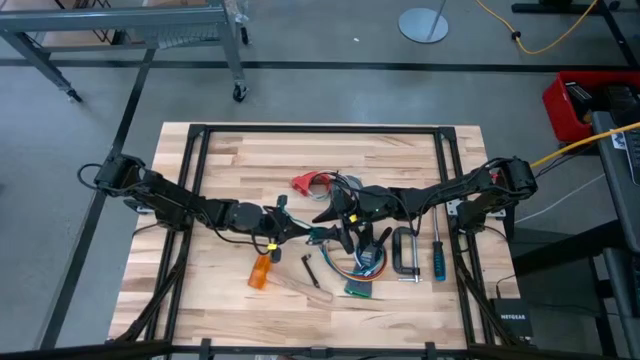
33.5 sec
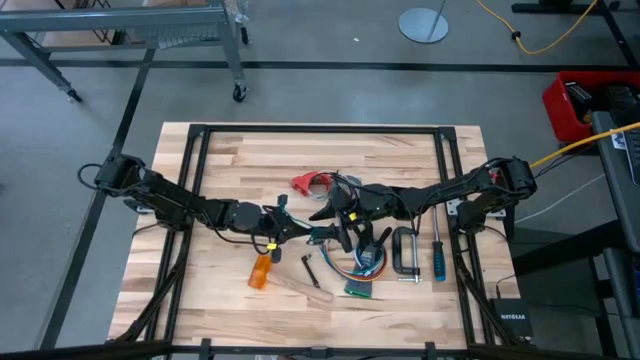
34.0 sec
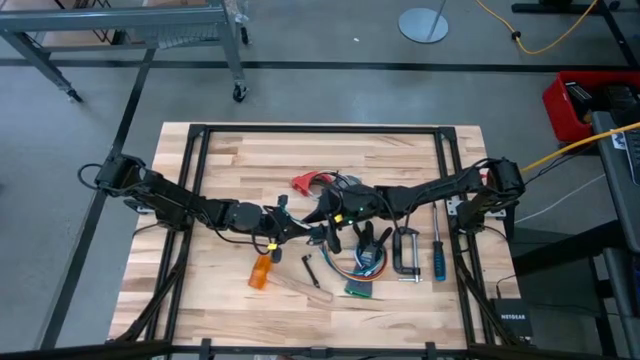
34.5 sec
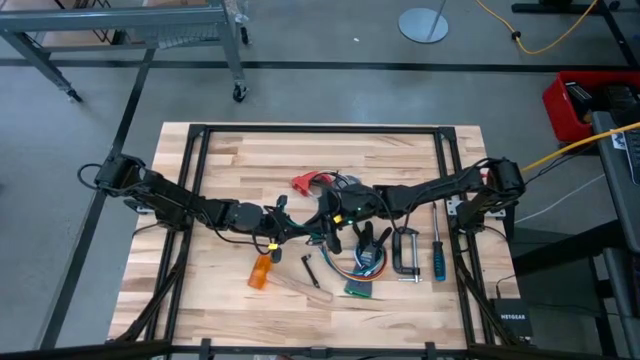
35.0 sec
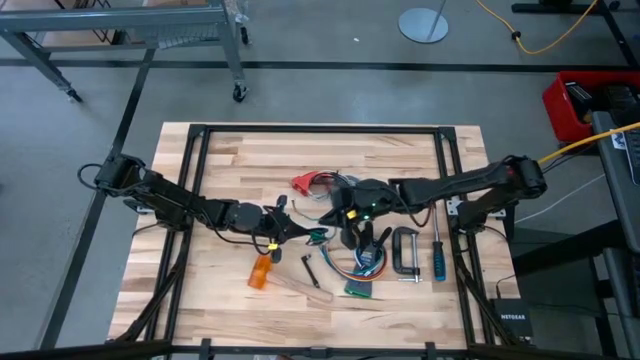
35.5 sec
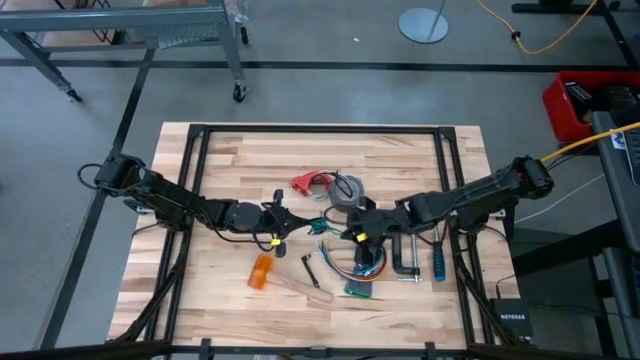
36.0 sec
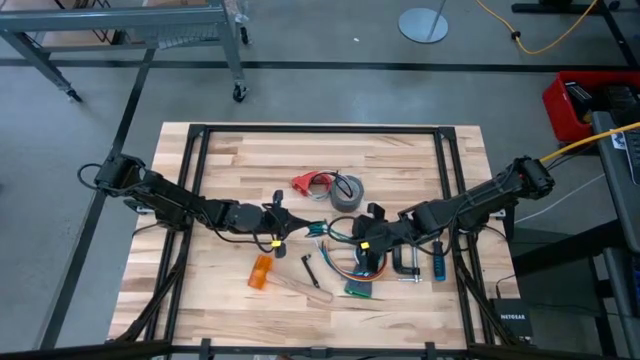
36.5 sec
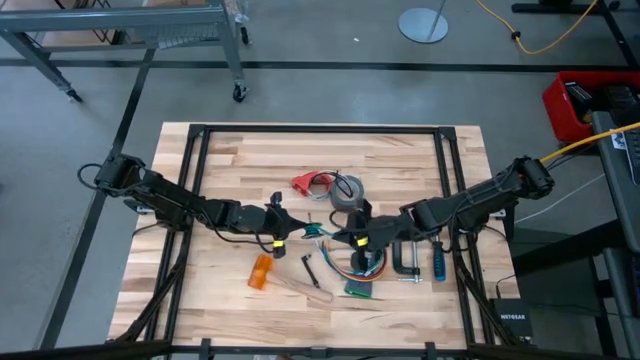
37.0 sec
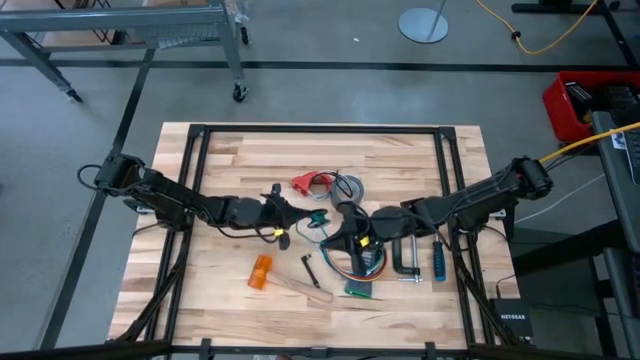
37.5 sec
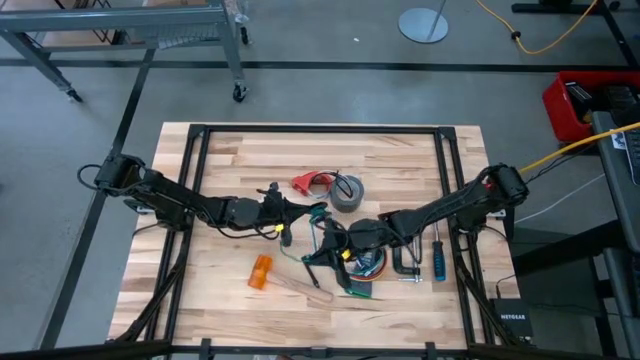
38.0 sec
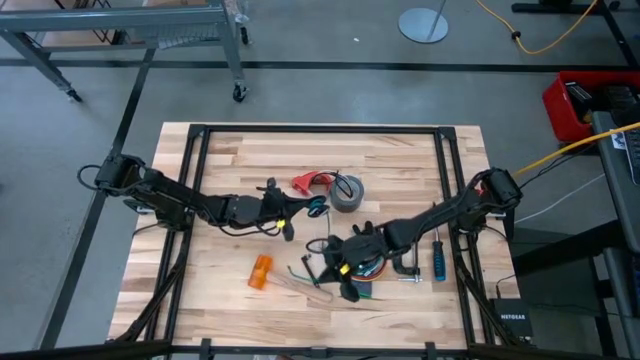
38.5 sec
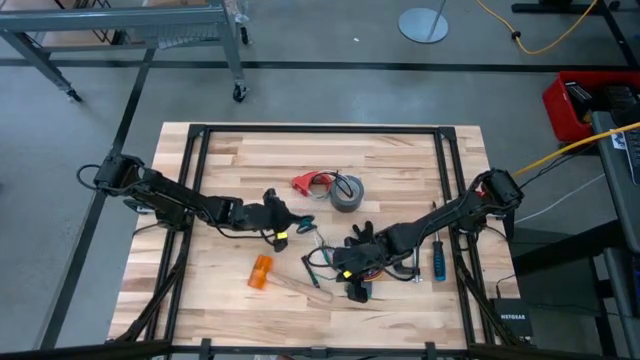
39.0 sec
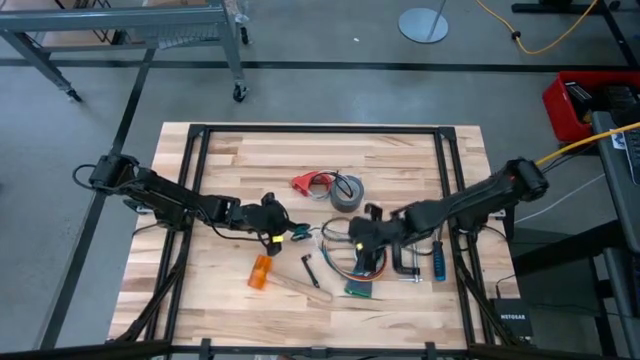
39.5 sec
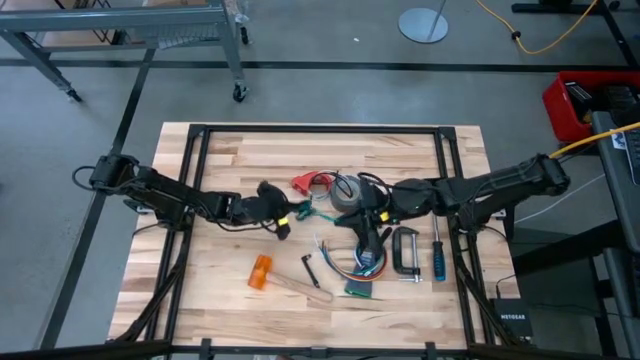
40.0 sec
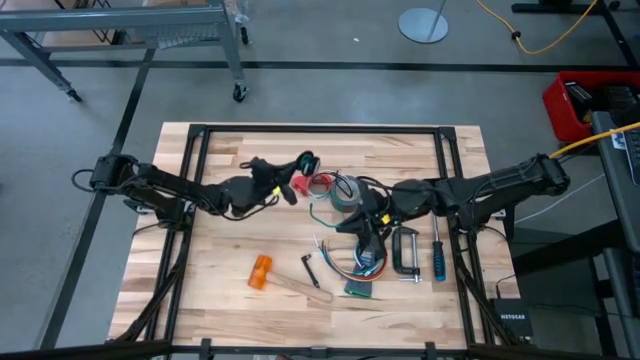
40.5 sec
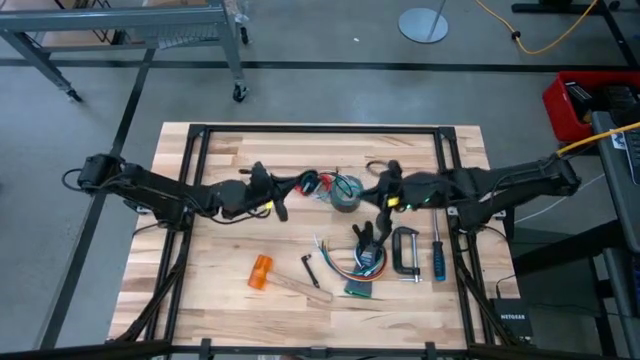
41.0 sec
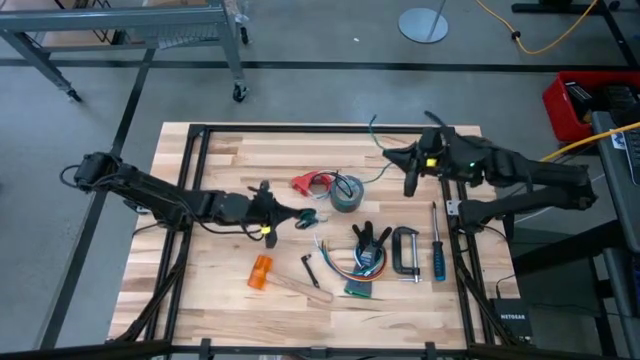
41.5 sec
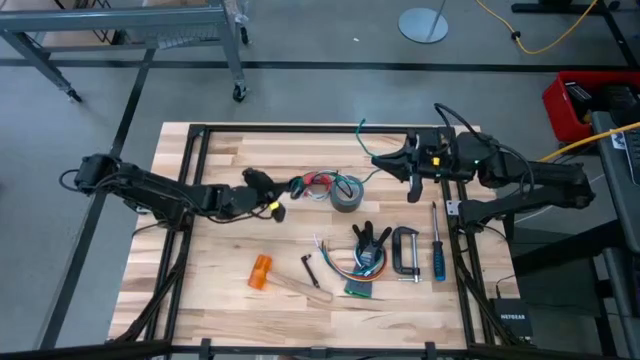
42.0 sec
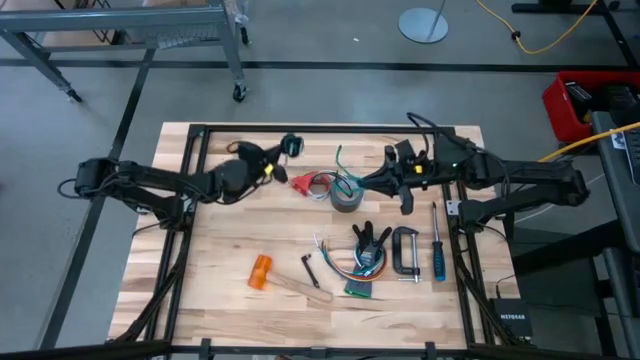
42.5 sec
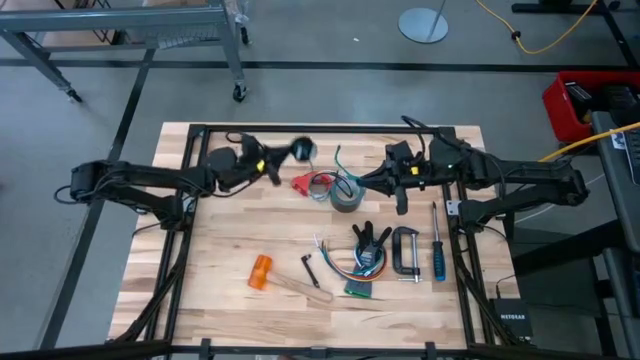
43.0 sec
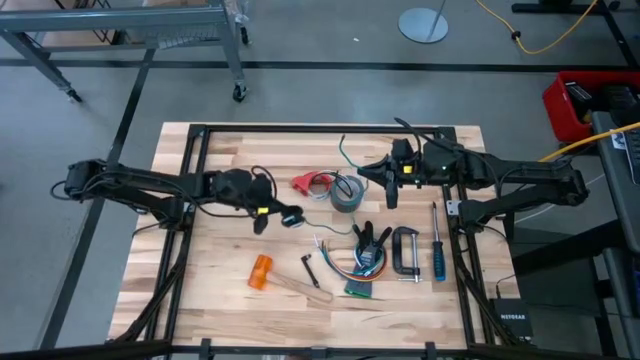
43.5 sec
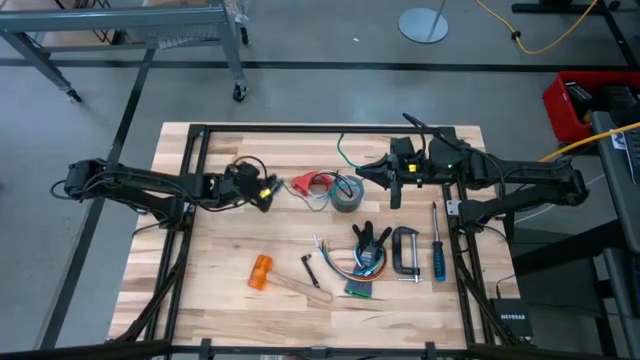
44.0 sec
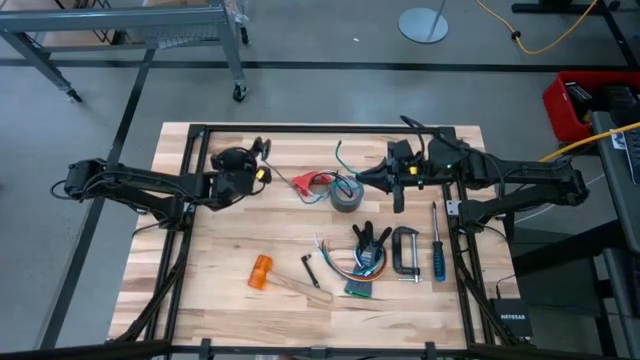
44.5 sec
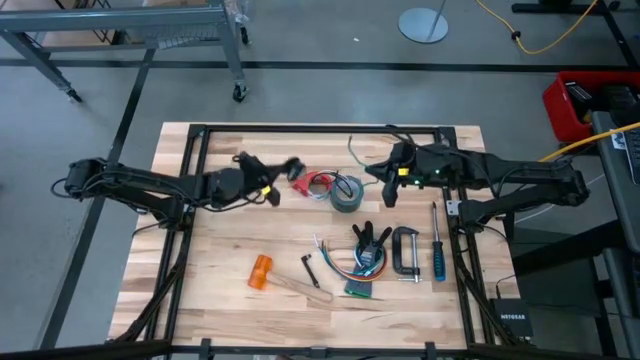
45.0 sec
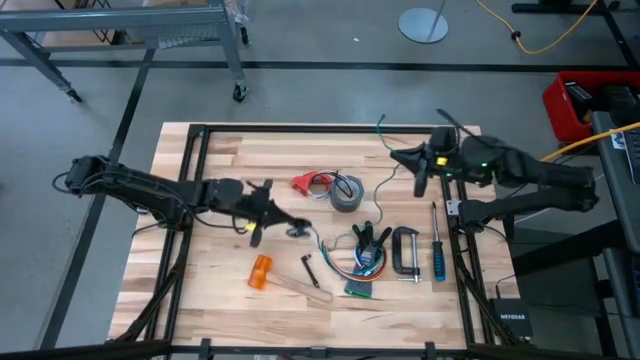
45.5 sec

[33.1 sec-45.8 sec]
Task: Coil cords
Uncoil the blue wire from the spool

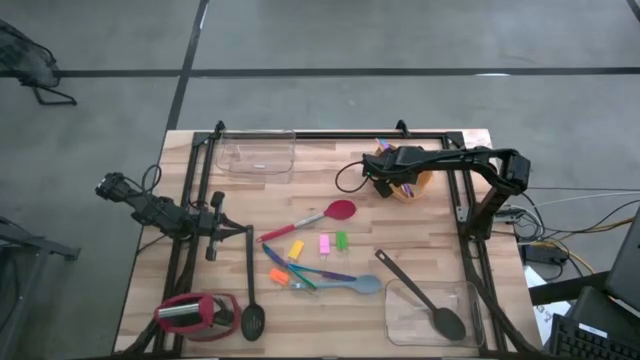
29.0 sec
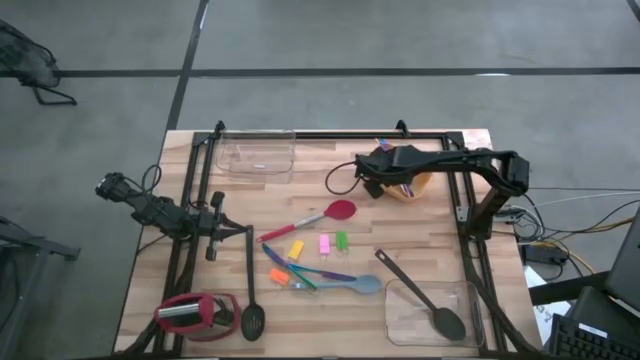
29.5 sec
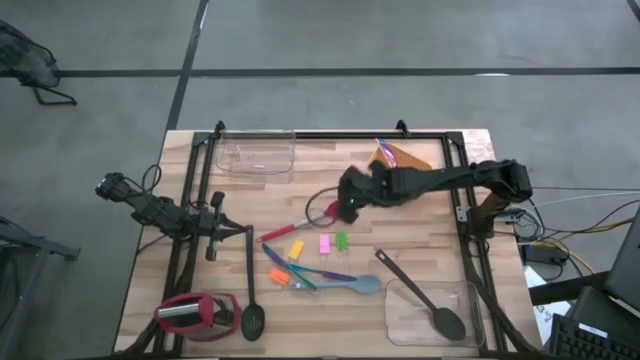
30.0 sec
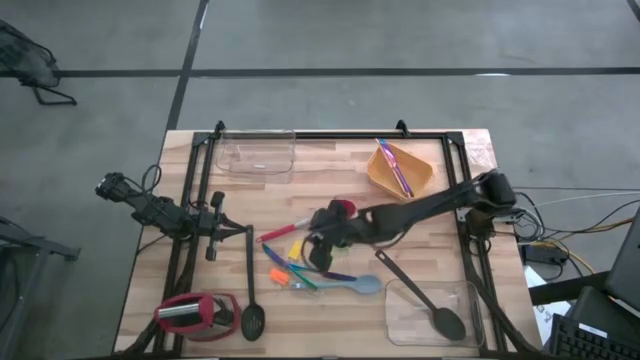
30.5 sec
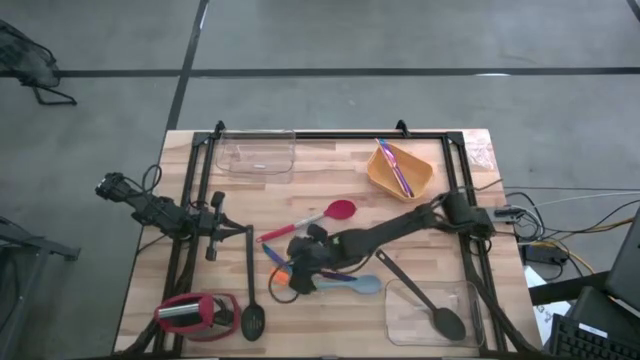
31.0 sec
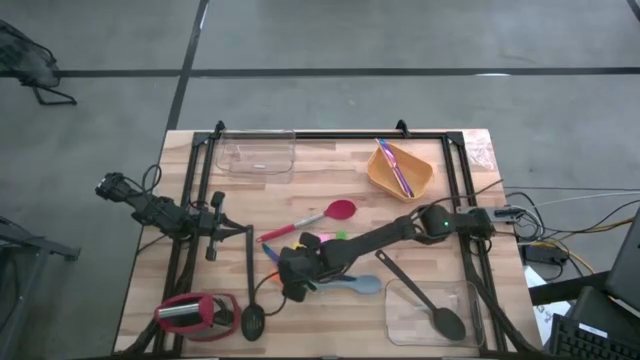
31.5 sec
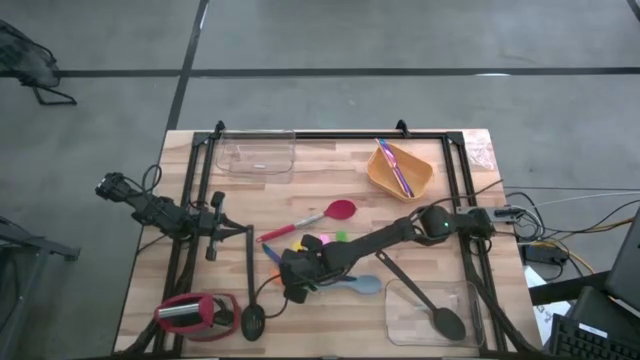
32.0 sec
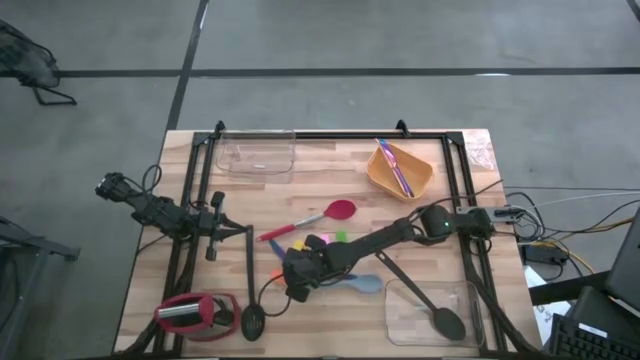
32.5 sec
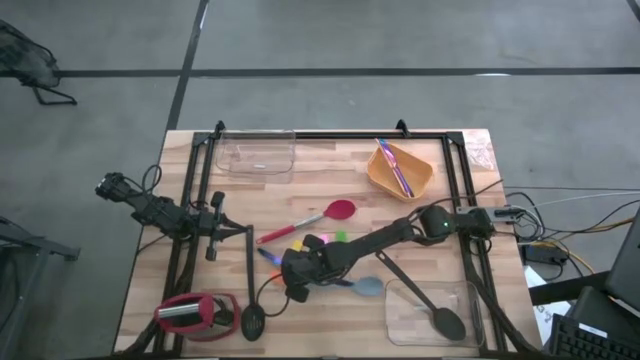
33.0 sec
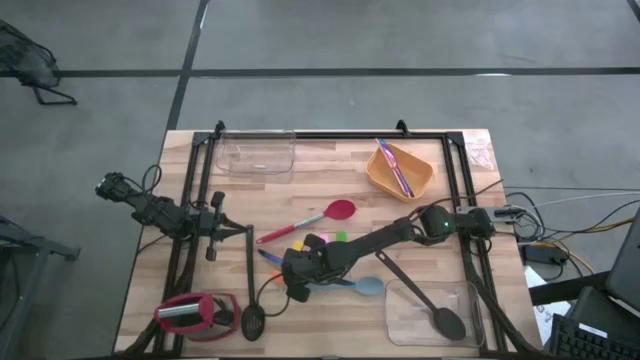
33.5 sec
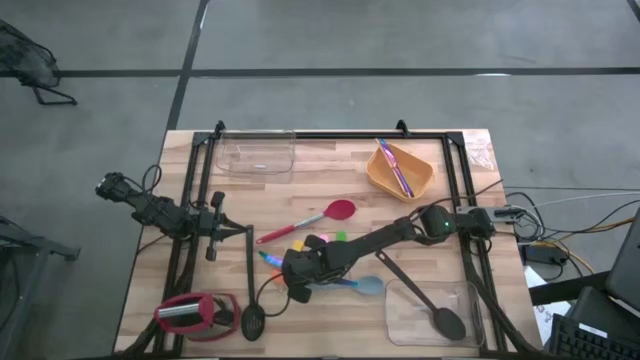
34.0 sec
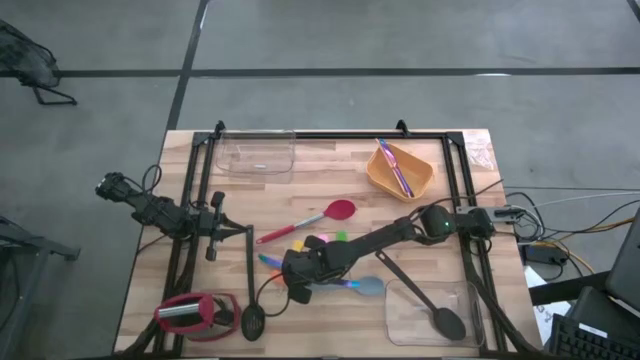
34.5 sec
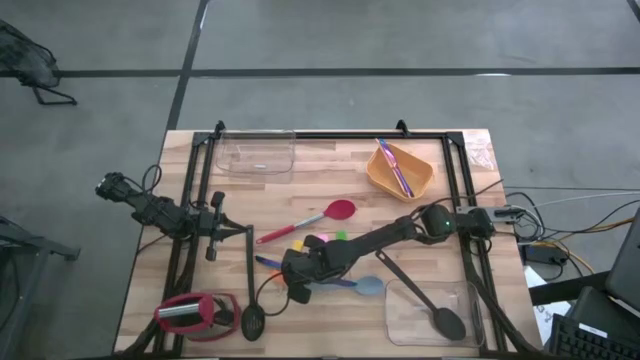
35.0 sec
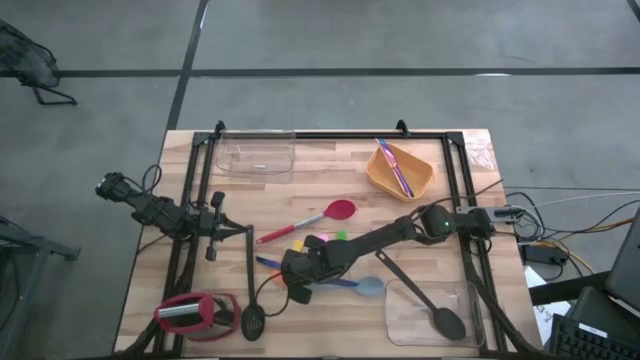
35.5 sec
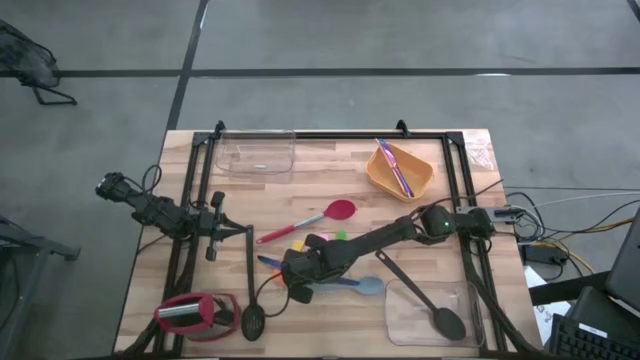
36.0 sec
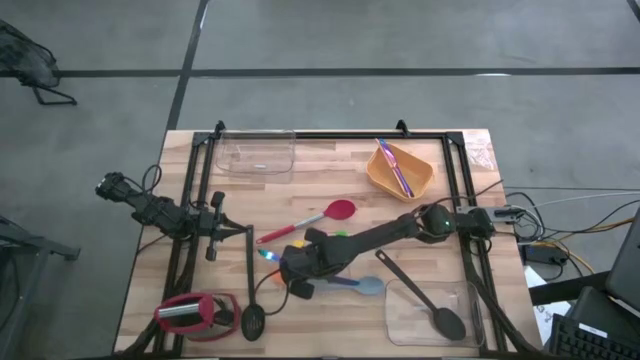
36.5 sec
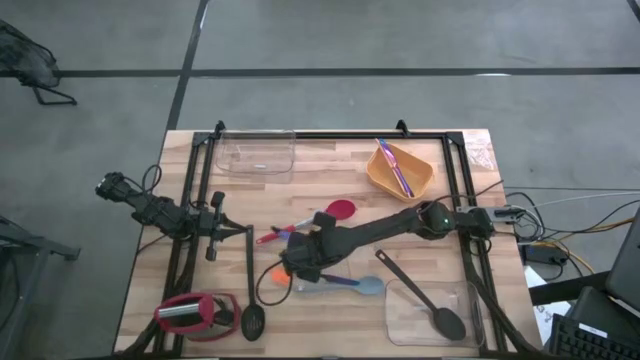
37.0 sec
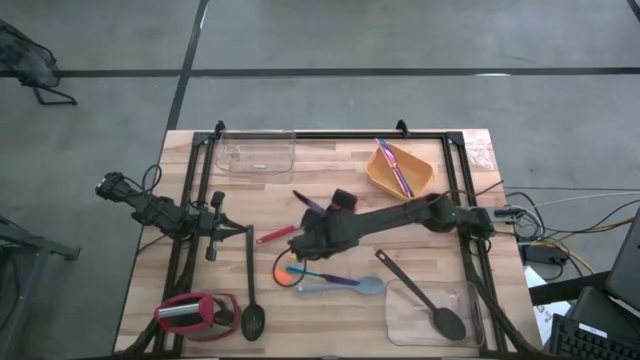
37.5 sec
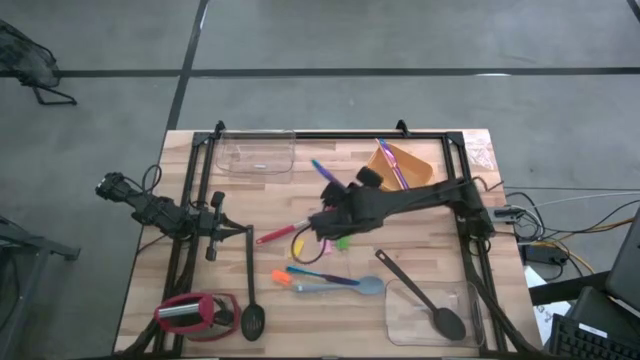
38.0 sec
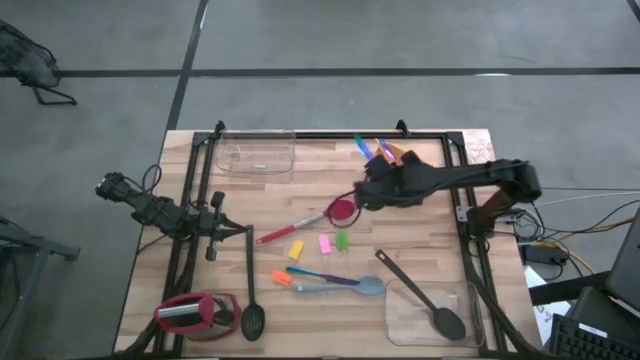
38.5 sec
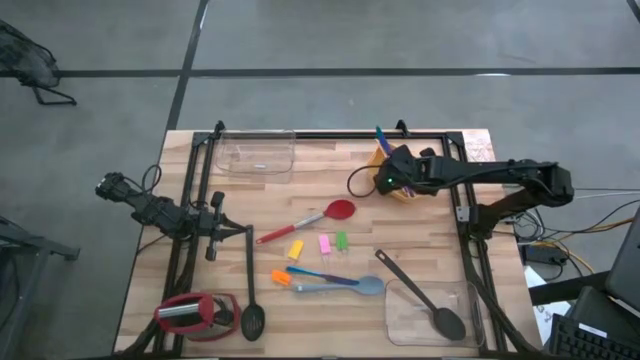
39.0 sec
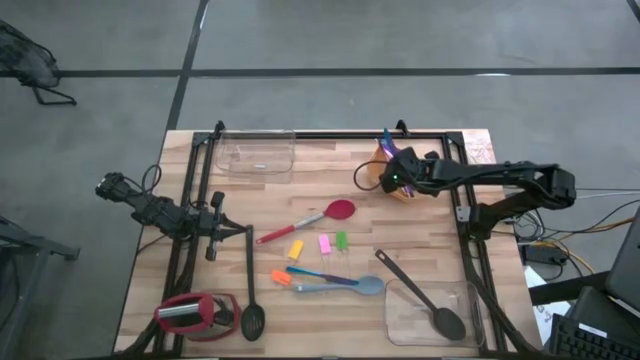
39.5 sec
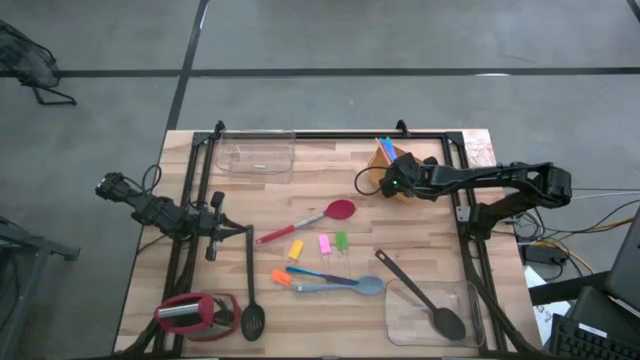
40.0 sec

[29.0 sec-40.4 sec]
Task: Pick & Place Kitchen Items
Put the blue knife into the yellow bin
